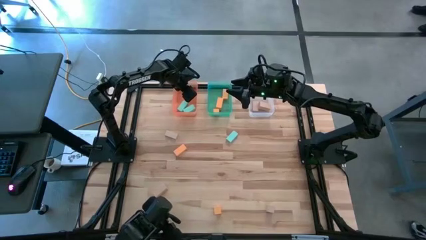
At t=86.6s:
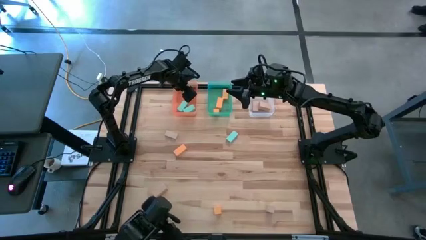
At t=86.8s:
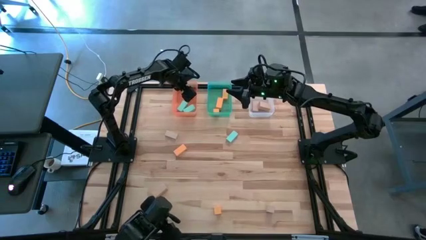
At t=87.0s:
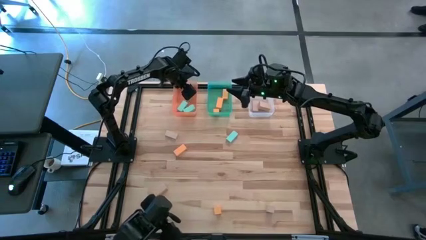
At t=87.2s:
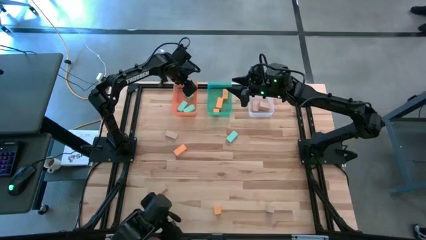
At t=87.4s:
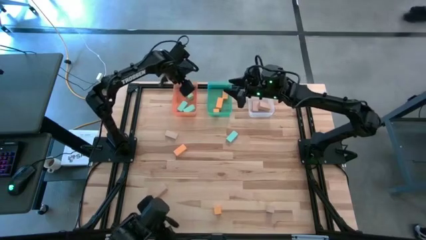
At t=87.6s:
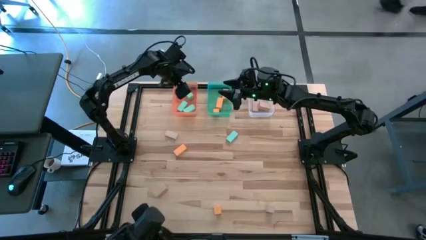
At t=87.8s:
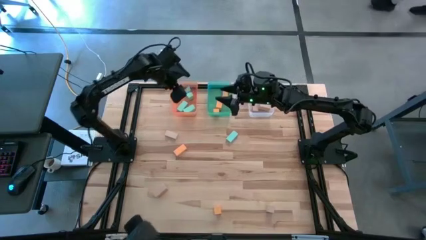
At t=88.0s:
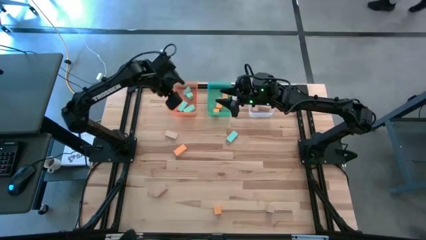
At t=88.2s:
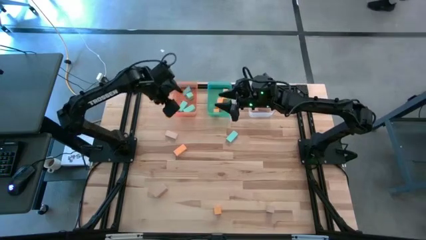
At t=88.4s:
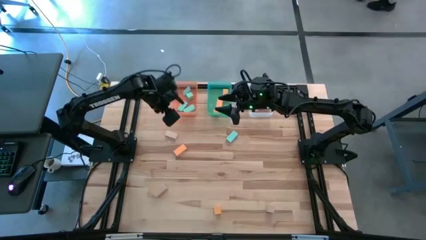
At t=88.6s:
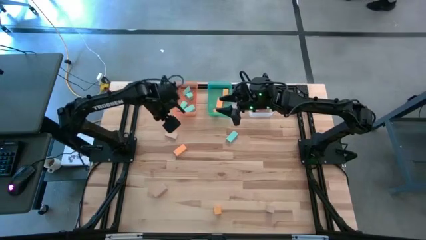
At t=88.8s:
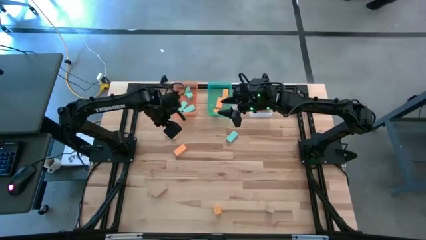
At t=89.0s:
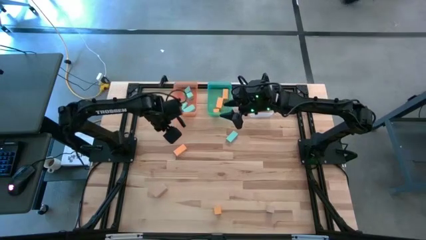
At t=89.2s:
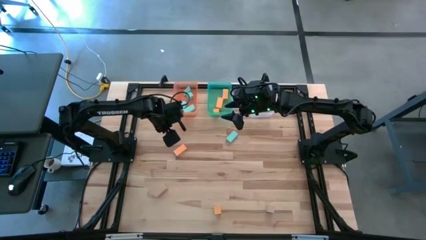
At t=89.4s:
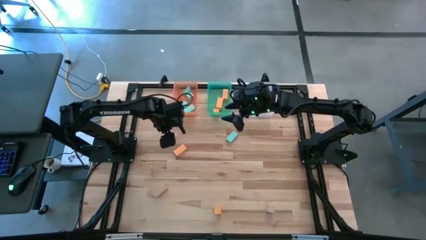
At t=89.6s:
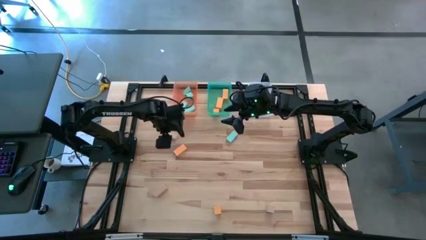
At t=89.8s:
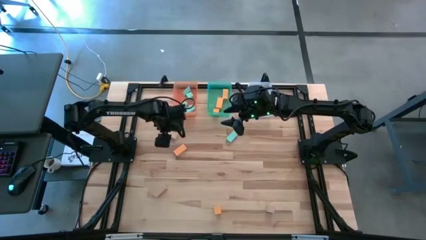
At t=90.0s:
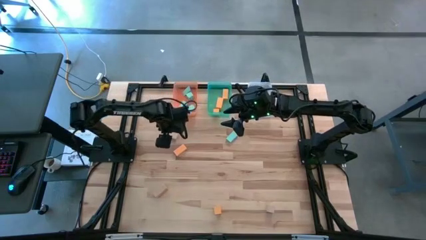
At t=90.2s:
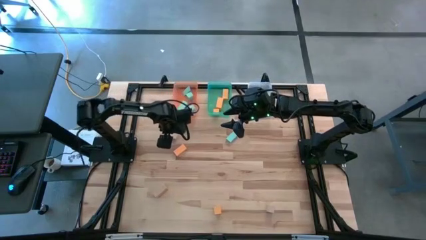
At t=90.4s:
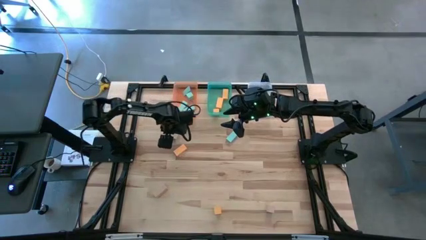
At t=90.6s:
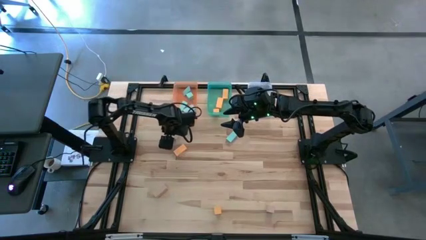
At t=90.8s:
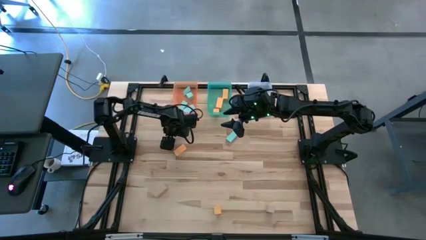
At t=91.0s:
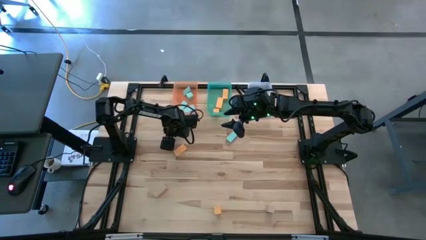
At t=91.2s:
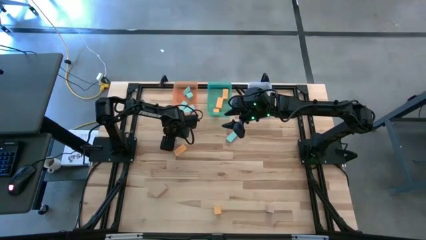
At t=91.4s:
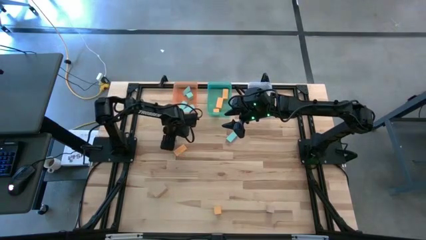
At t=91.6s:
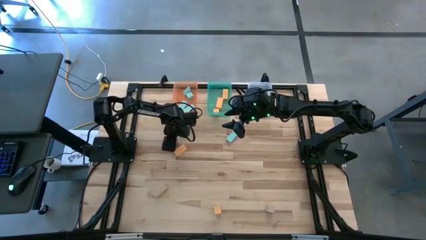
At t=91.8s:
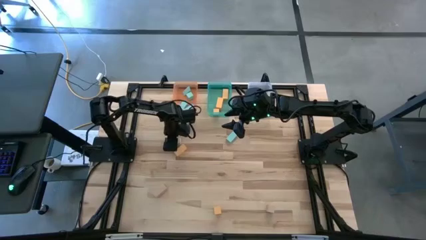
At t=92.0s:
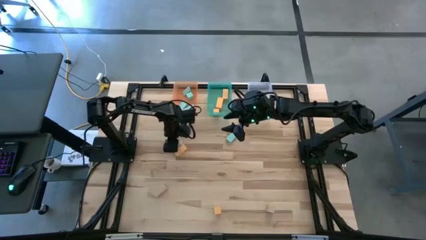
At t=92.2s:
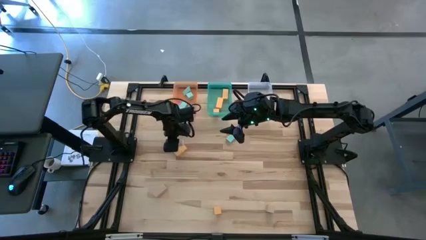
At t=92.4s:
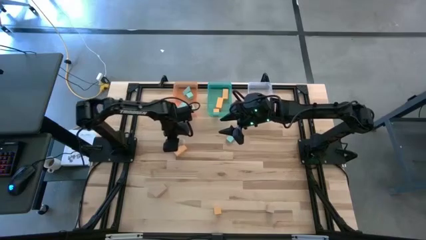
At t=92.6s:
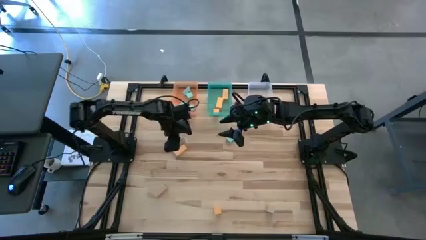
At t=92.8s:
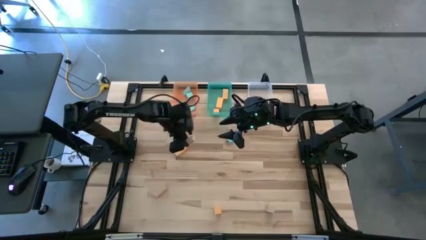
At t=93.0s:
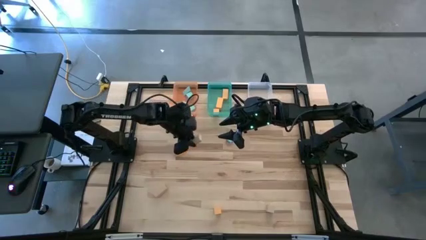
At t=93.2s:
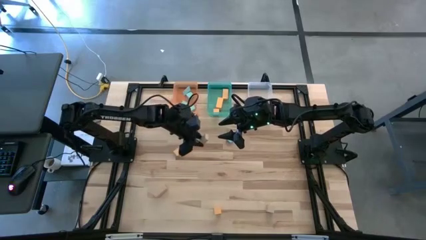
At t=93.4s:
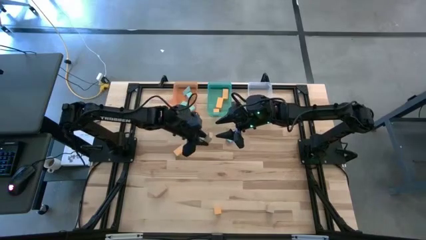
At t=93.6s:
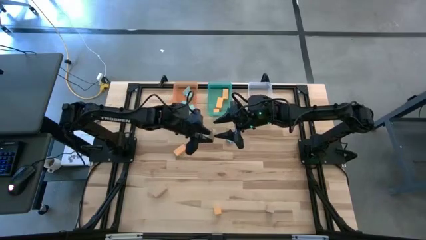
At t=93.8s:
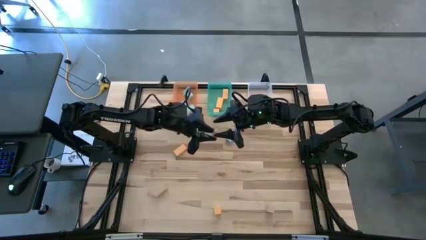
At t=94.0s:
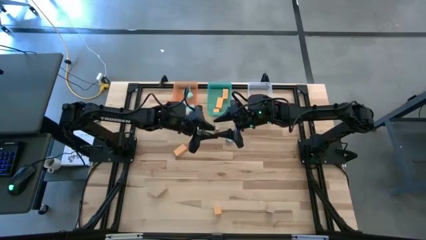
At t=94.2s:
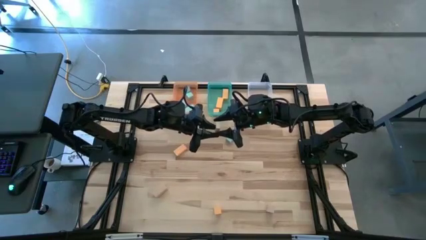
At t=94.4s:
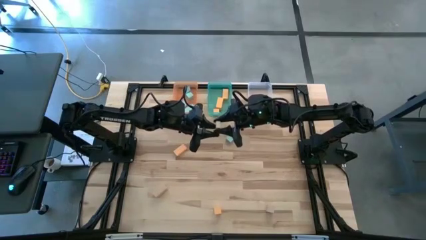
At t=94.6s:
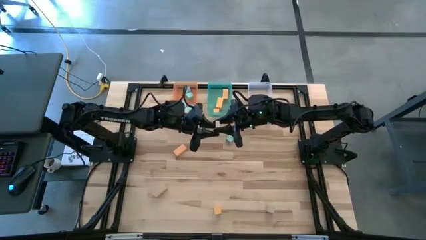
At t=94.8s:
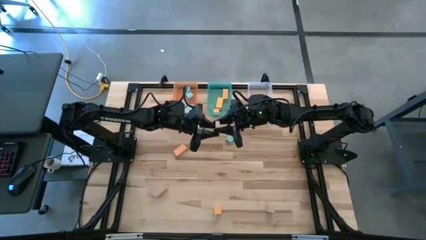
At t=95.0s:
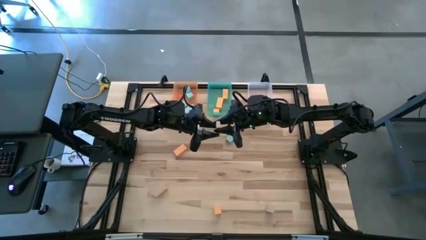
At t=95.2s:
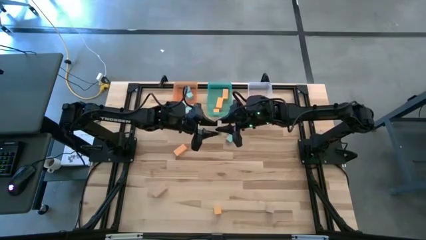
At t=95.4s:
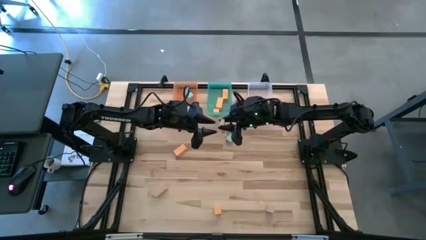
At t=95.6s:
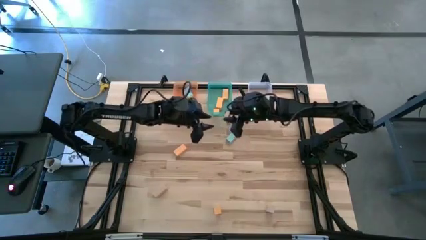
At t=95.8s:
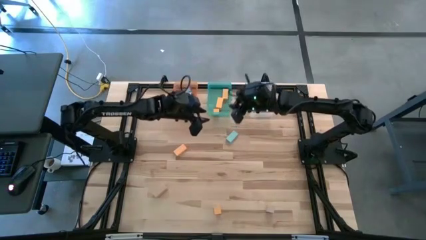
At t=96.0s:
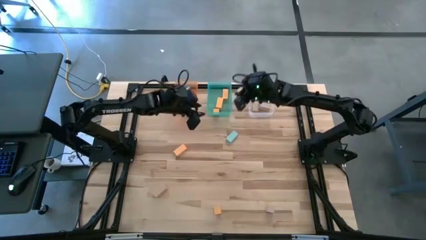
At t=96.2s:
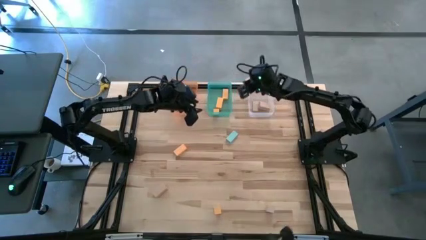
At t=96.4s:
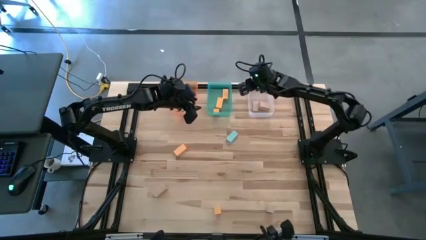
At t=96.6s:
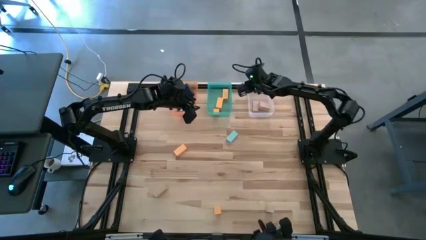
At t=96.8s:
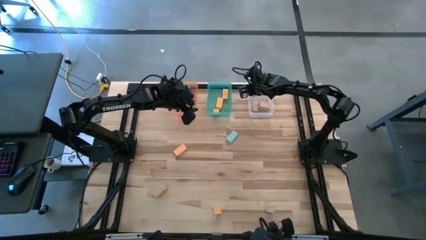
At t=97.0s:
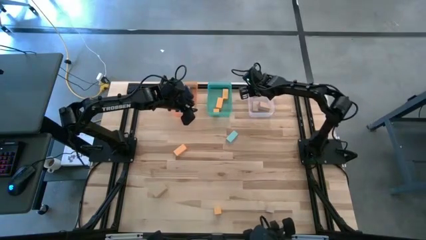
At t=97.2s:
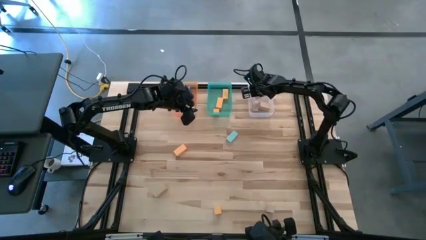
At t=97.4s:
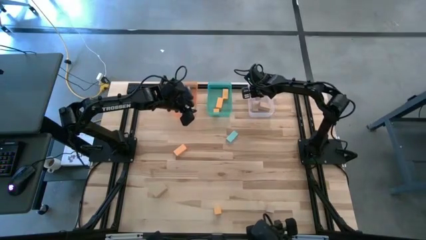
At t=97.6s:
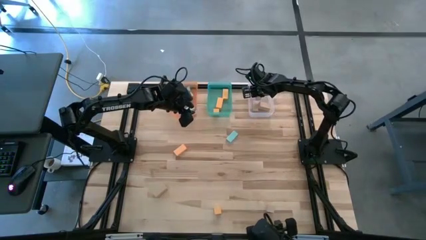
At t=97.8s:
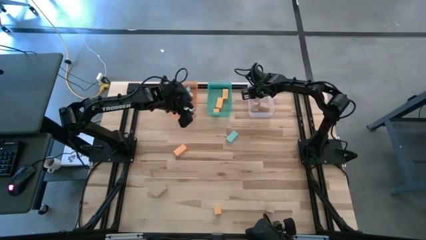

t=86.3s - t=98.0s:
Task: Sort & place blocks by color
Put the brown block into the transparent bin

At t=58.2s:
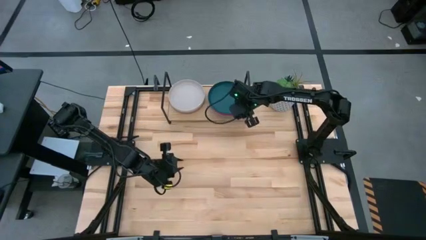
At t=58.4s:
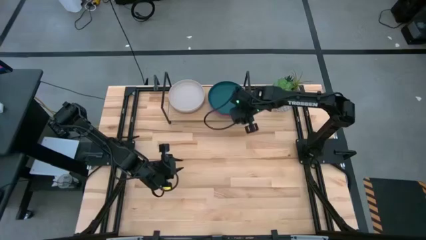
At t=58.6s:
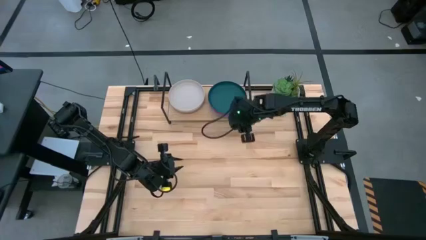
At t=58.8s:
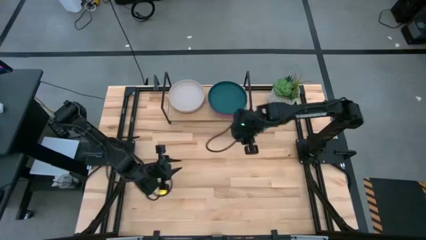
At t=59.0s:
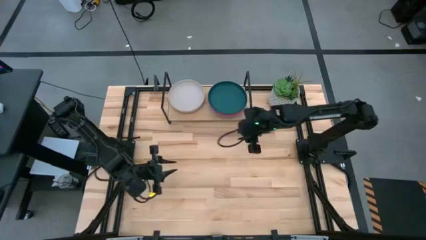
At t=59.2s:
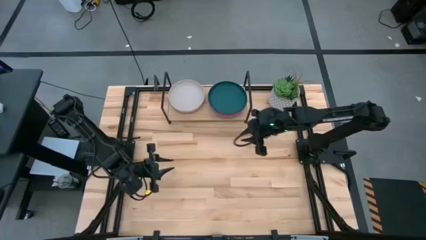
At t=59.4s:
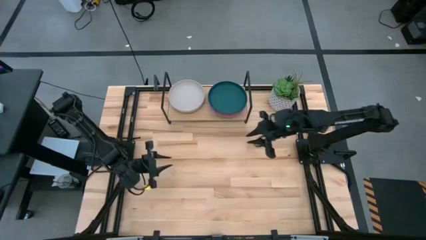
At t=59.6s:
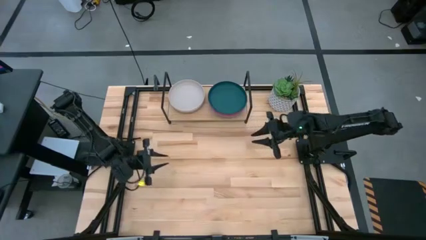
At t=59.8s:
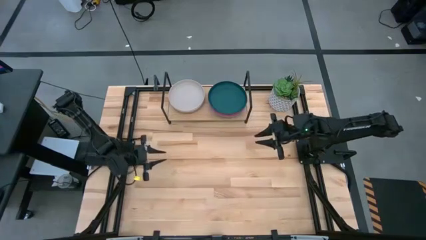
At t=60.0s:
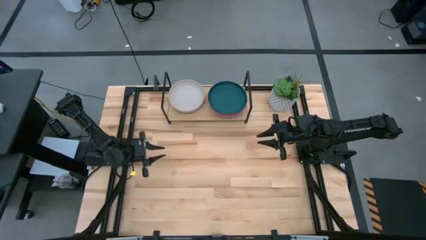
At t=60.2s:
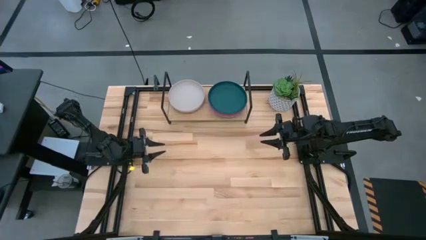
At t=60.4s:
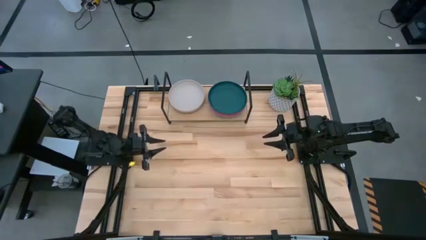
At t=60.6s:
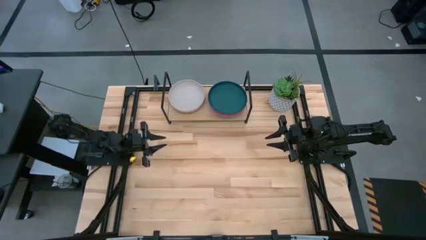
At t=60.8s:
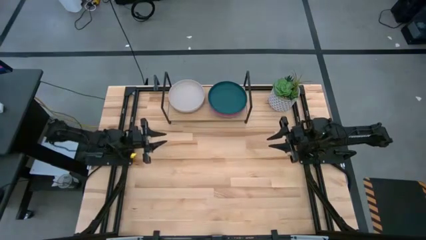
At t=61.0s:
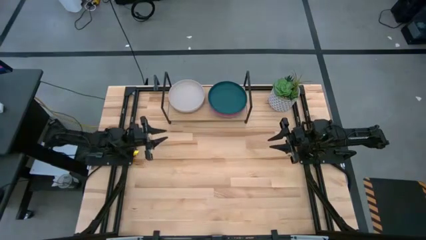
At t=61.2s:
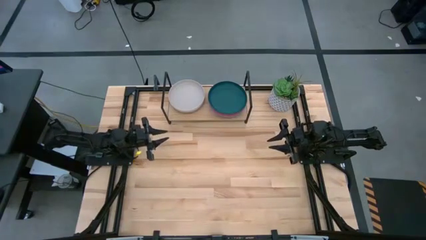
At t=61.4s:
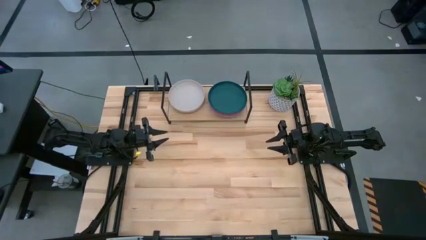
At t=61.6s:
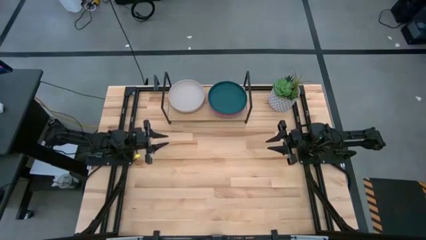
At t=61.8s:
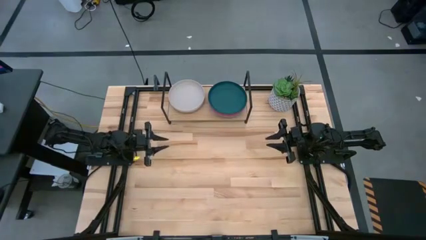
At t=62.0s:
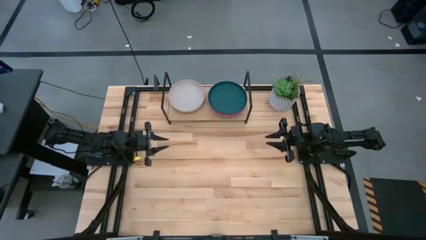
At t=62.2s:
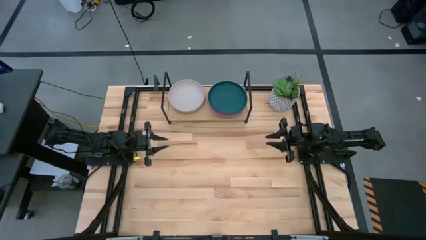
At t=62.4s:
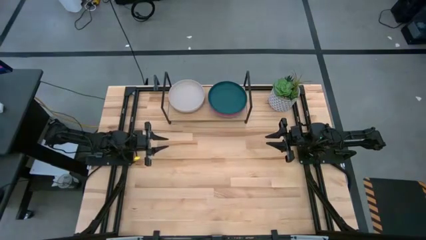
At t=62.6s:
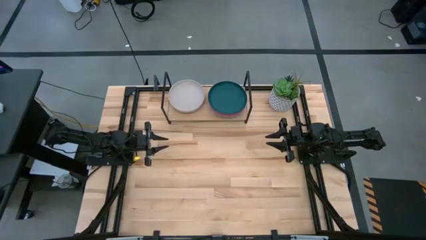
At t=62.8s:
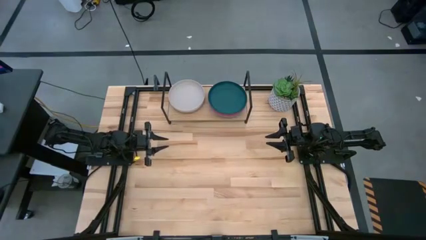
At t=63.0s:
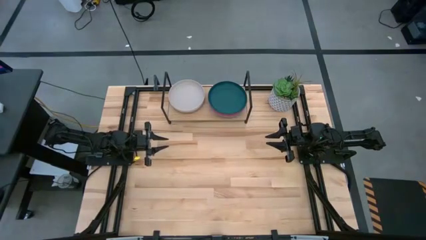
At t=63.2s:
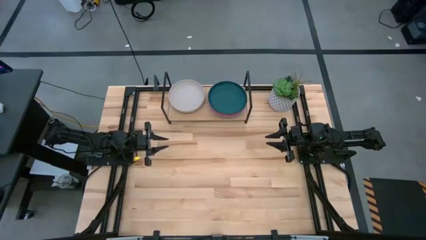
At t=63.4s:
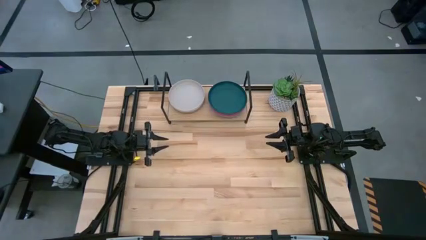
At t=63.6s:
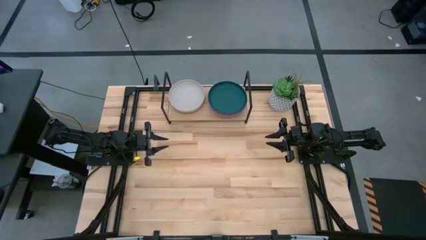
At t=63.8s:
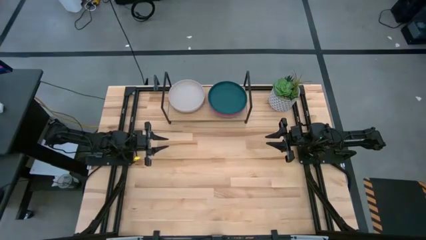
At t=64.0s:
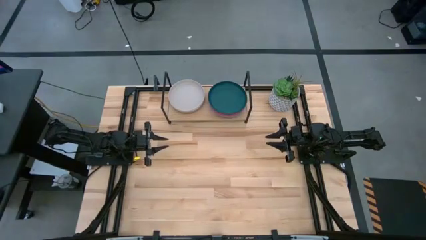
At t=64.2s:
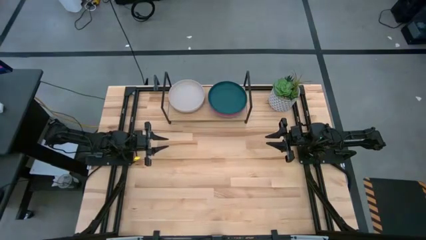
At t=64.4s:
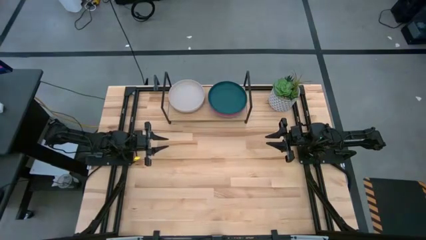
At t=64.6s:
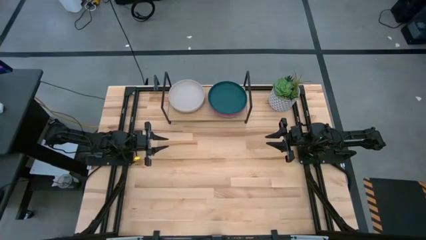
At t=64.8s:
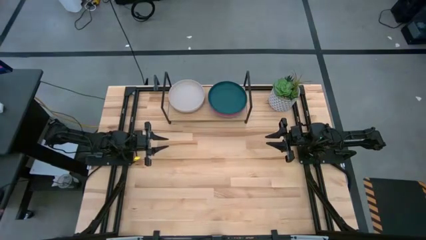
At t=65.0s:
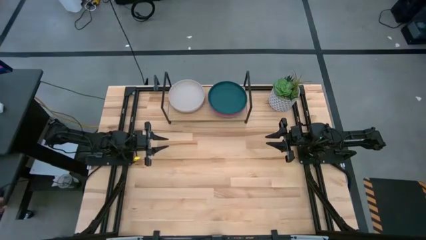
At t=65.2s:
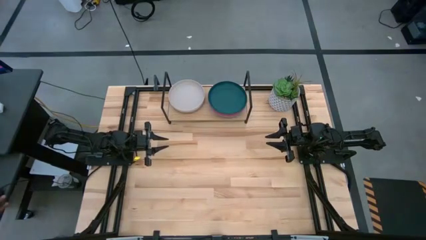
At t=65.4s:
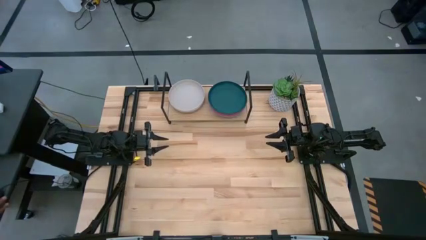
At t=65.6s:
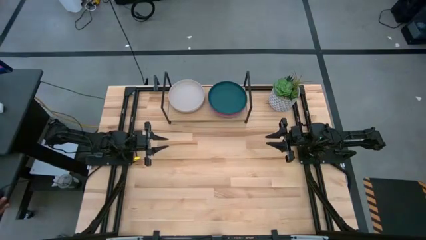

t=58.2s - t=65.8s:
Task: Place and stack plates onto a shelf
Return to Home Position
